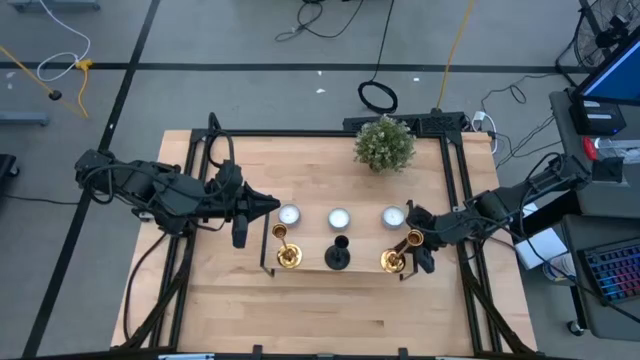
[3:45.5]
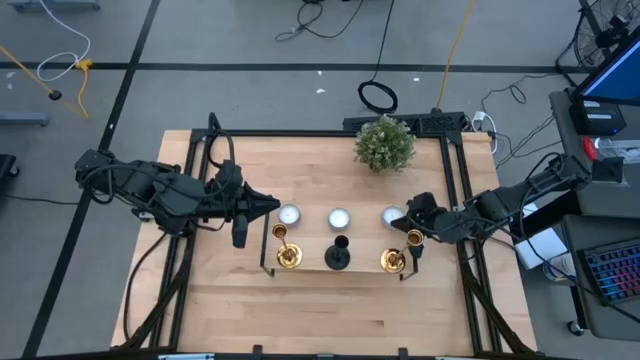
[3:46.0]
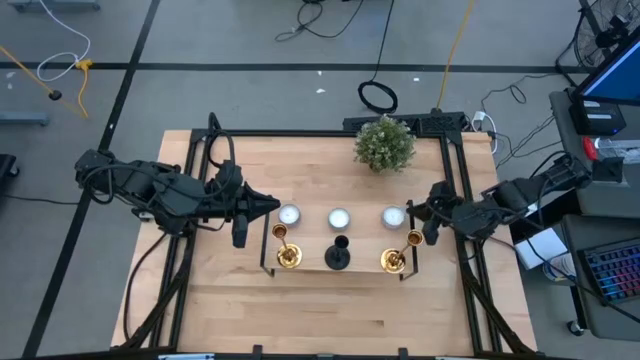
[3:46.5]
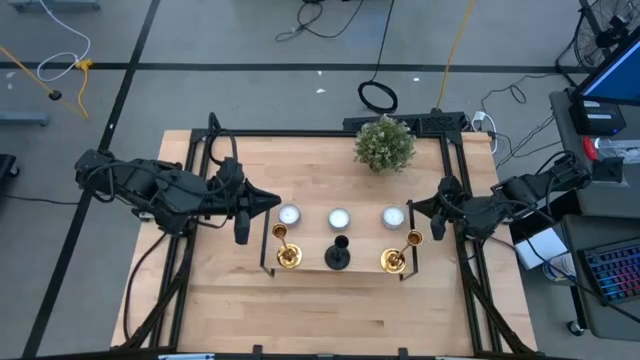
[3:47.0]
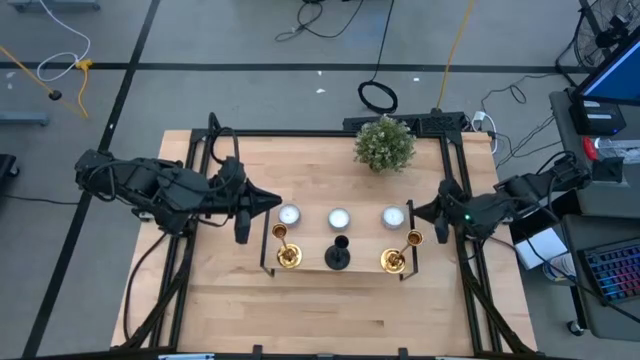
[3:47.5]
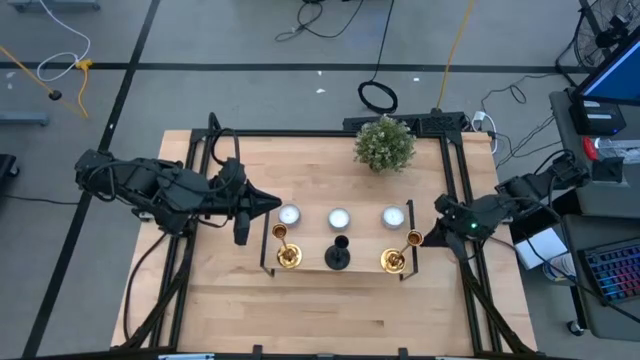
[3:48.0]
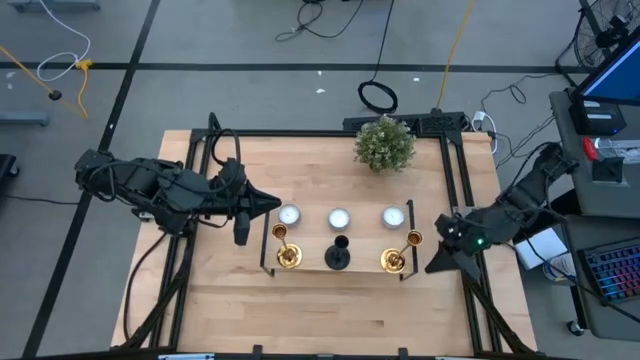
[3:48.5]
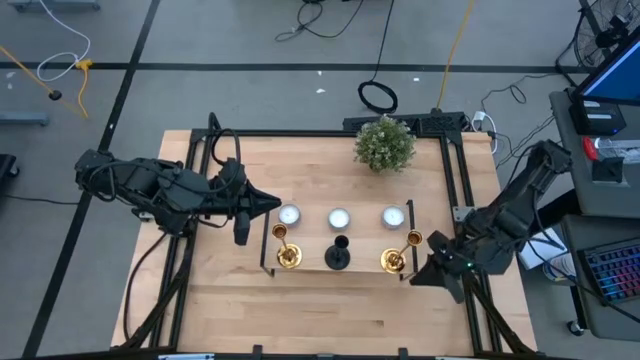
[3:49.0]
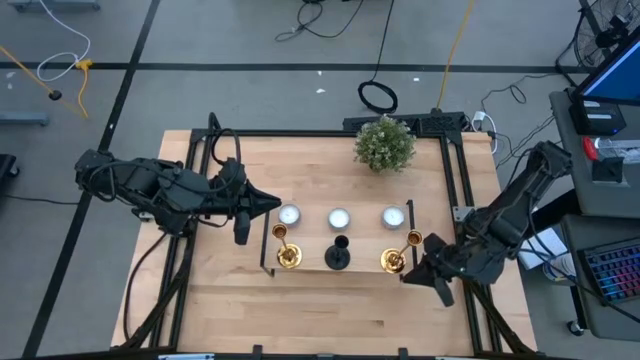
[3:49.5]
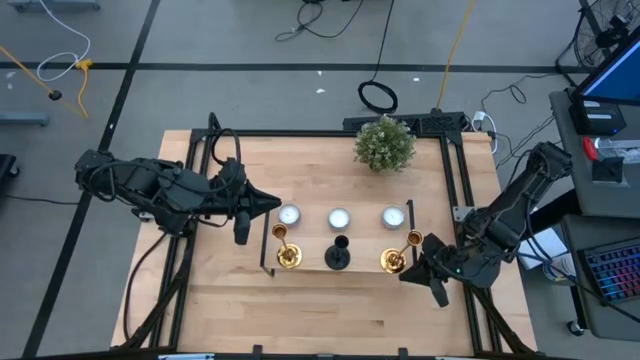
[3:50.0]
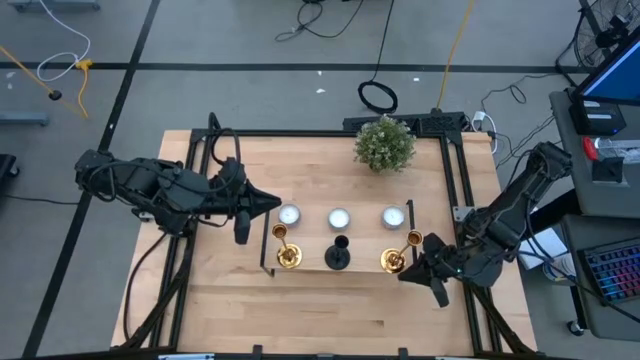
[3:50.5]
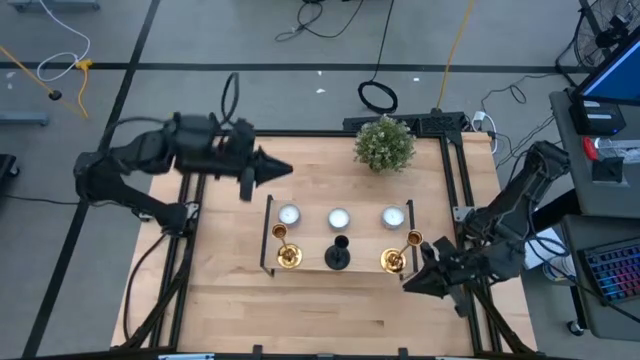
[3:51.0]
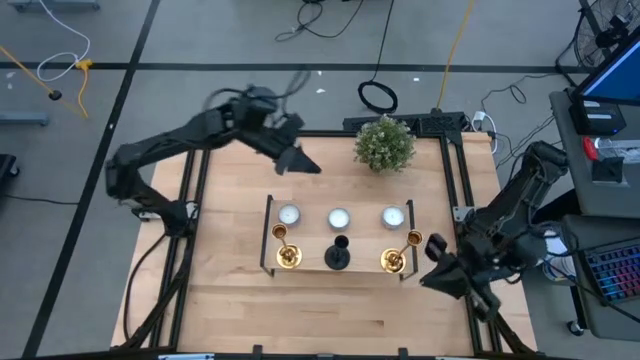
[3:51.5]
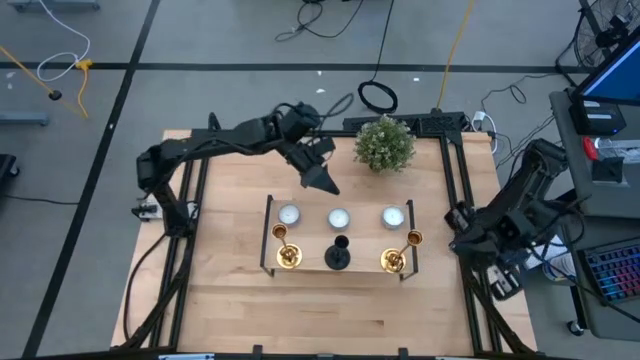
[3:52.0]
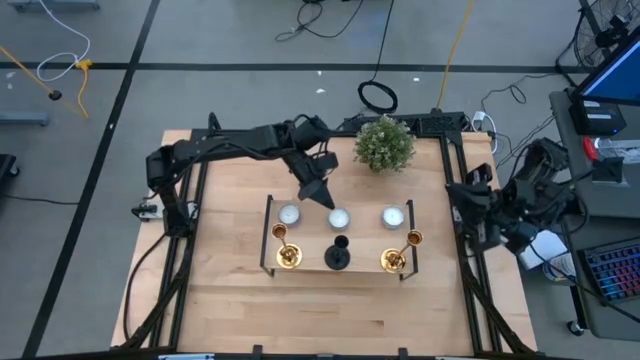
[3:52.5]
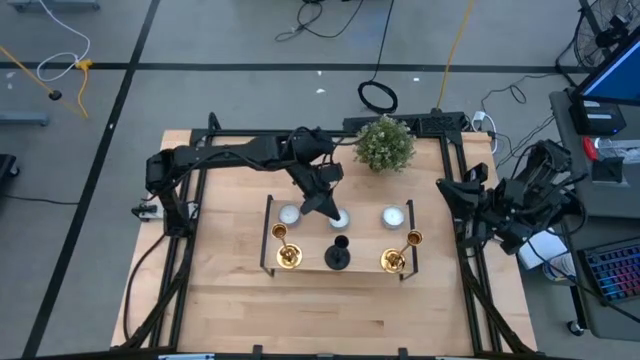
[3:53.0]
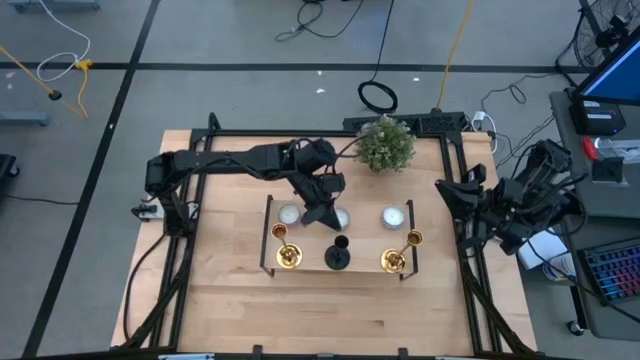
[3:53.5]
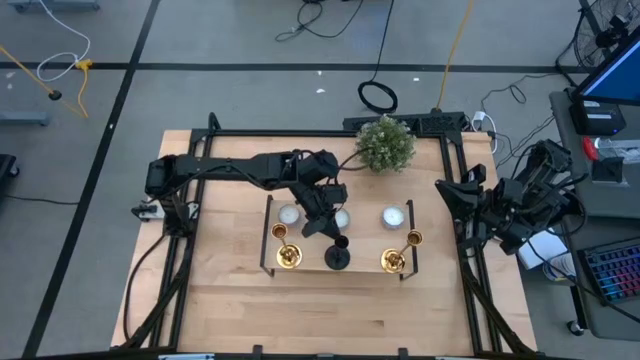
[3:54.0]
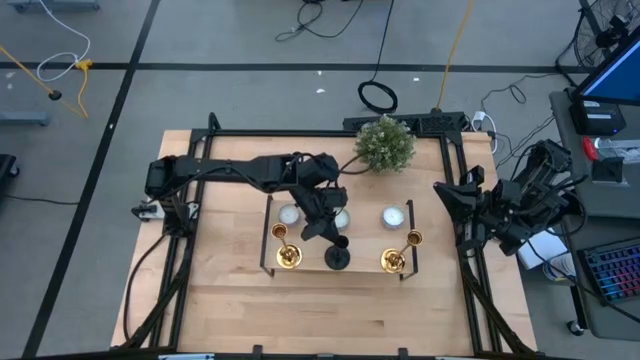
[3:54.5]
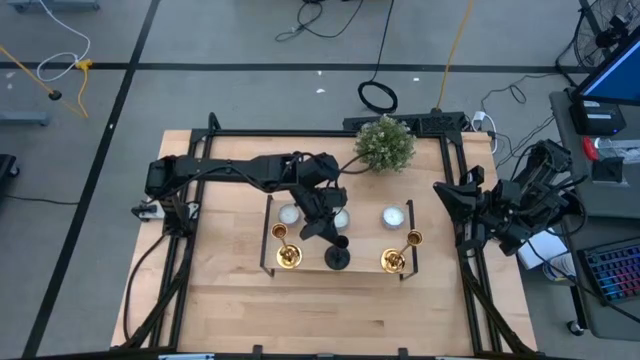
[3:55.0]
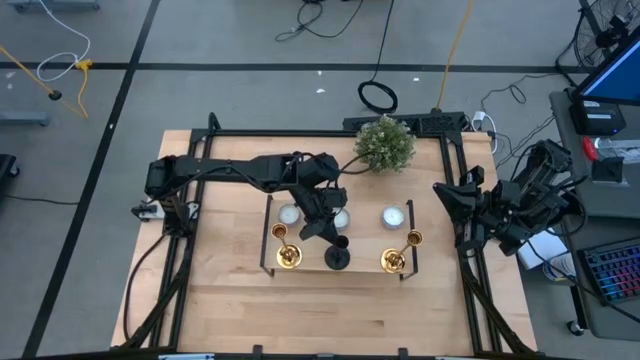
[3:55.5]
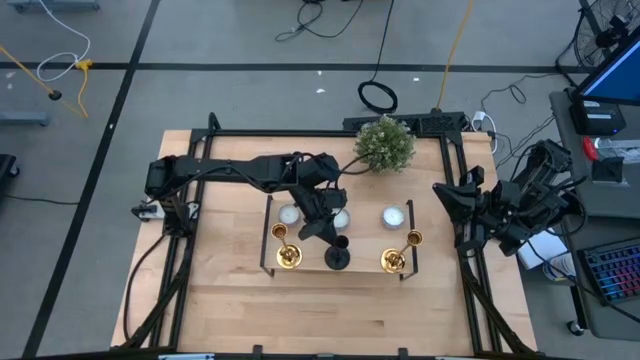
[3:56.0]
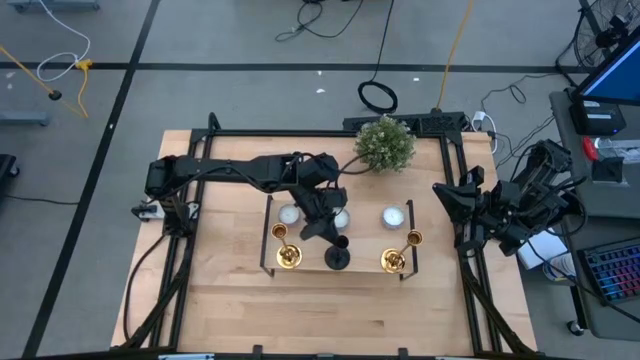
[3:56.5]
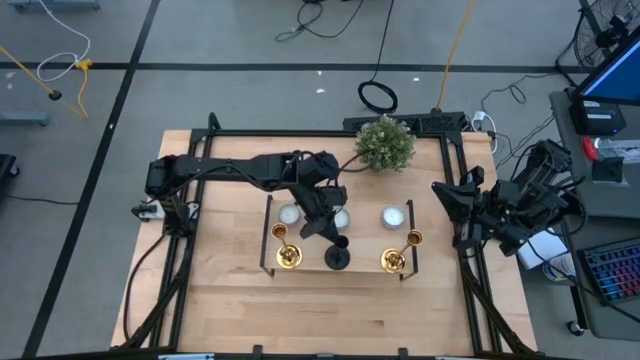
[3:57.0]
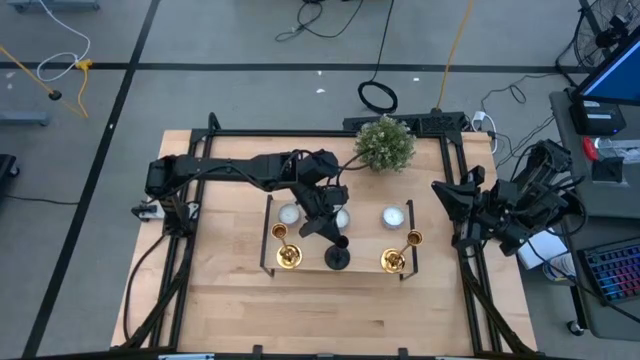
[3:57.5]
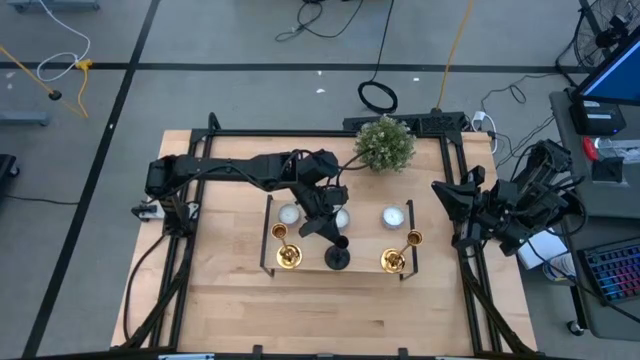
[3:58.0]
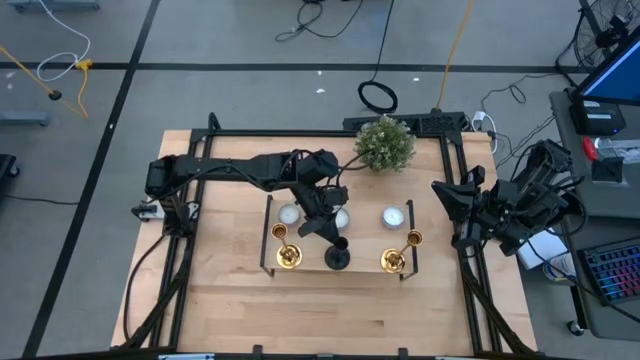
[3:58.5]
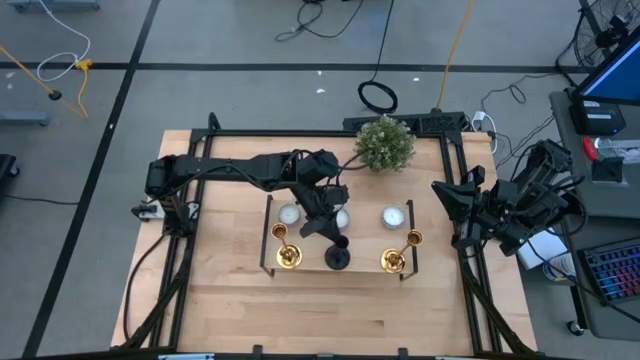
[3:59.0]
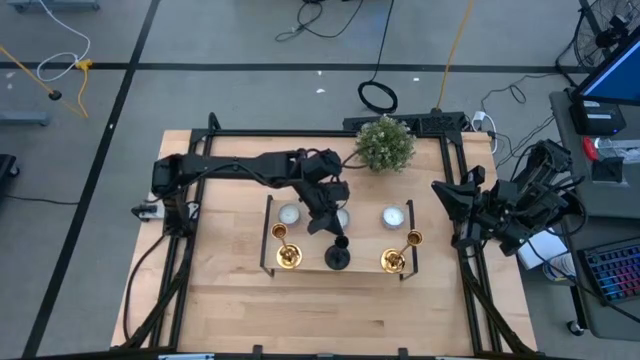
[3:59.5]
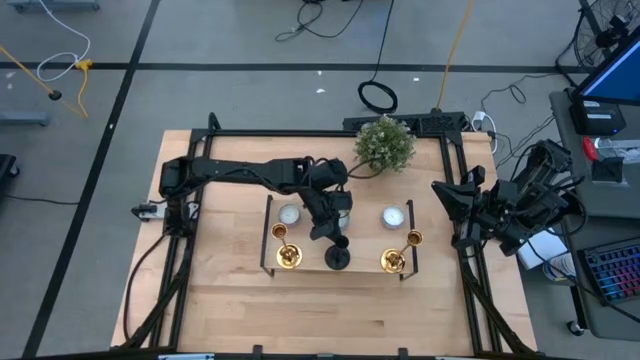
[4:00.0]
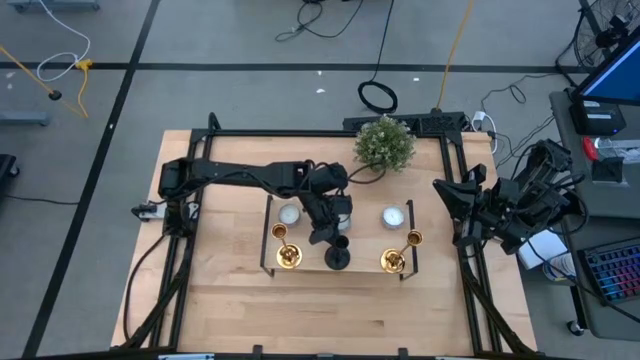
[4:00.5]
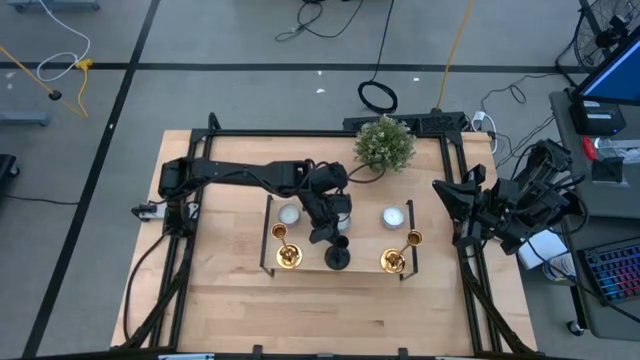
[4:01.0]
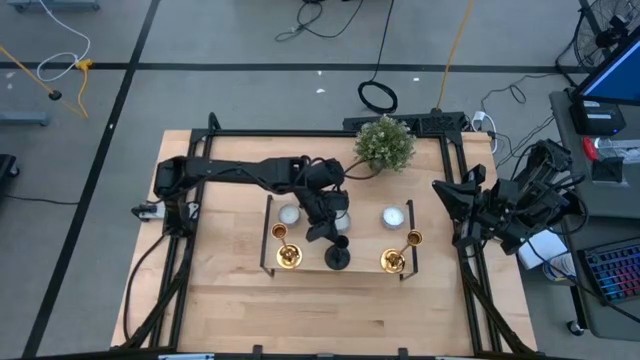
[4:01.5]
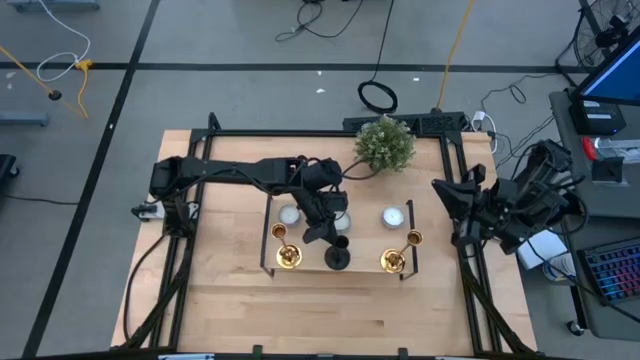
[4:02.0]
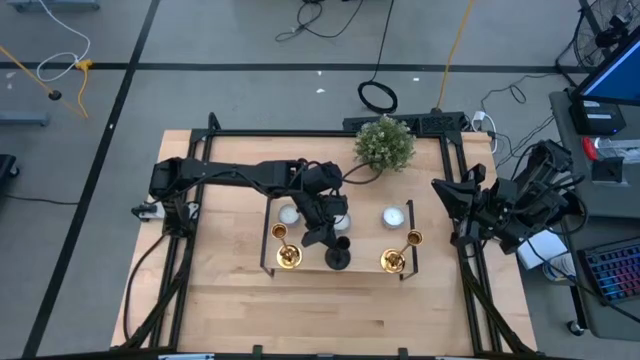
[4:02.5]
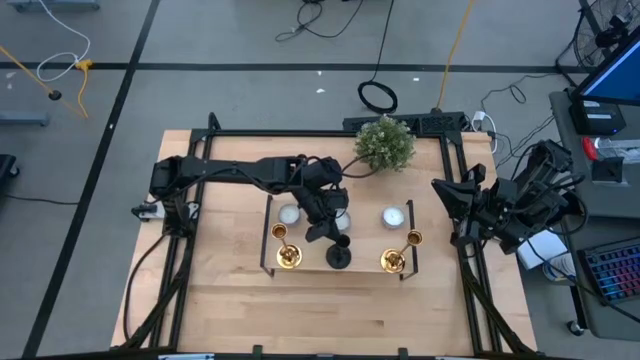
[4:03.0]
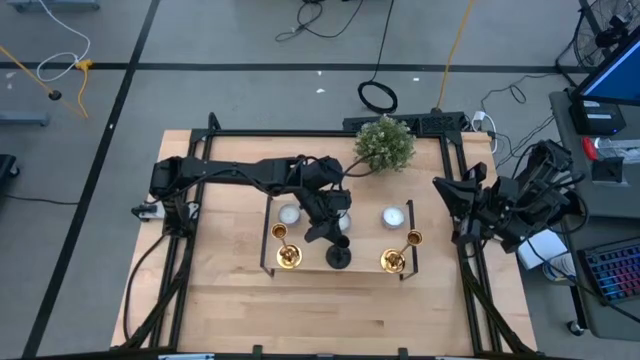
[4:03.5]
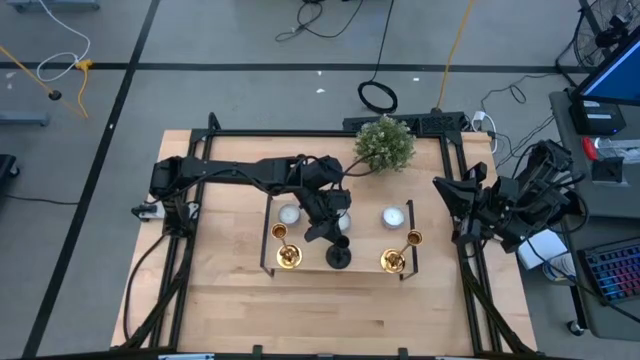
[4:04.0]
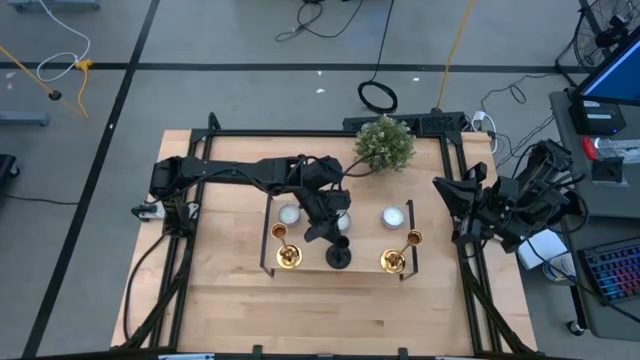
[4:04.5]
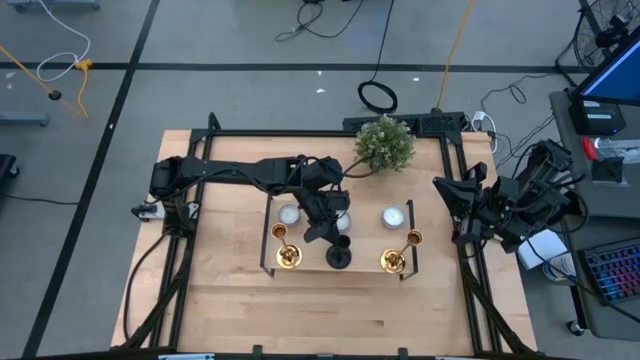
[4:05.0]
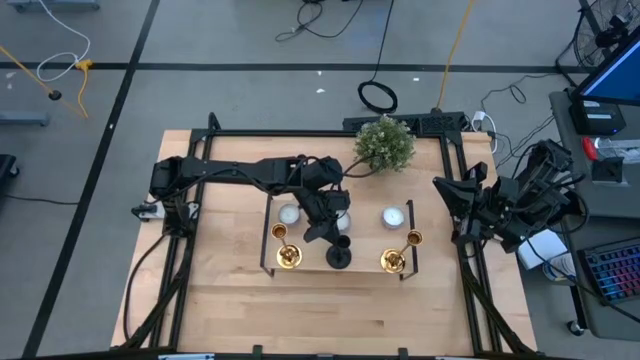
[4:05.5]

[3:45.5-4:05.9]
Task: Pick & Place candle stick holders
Adjust the black candleholder on the shelf

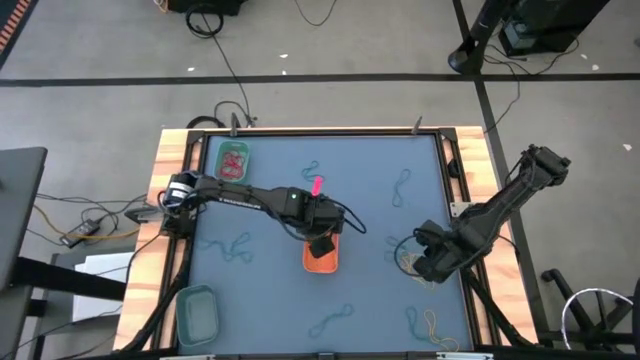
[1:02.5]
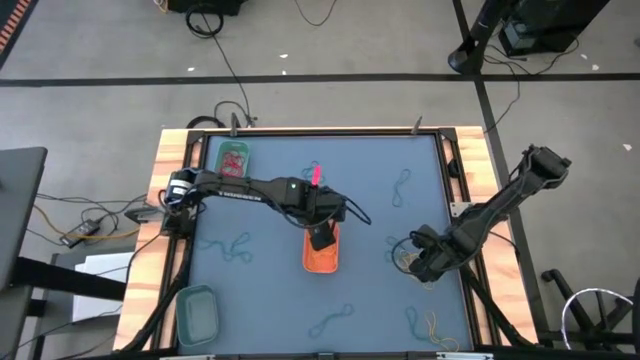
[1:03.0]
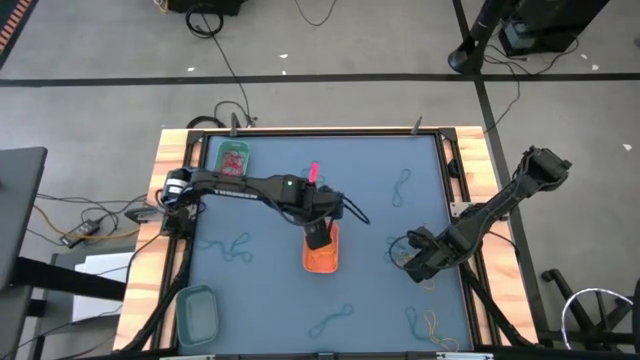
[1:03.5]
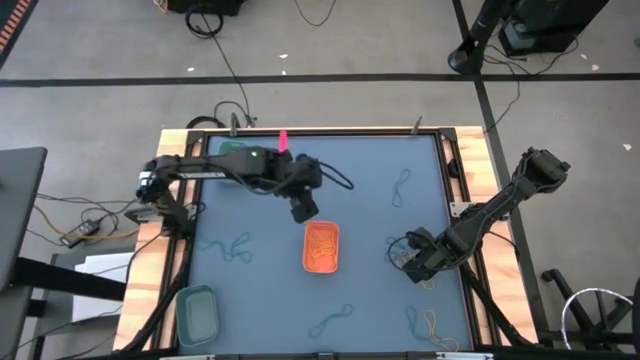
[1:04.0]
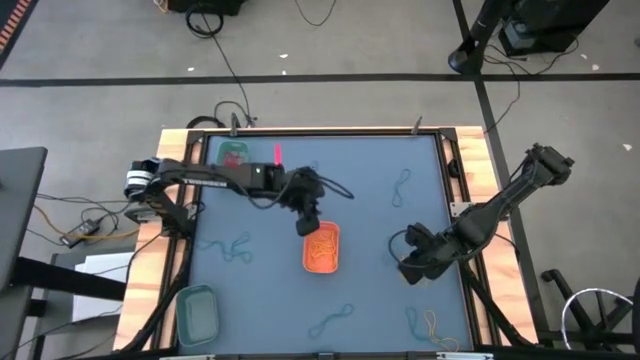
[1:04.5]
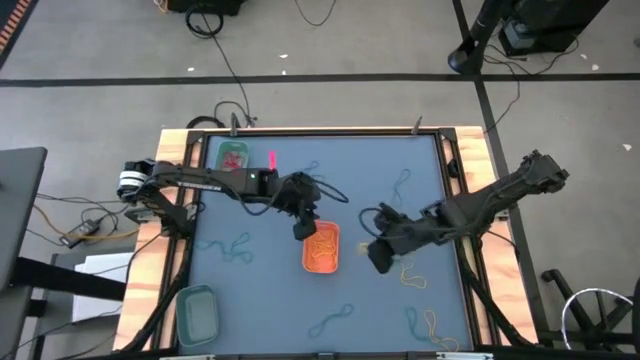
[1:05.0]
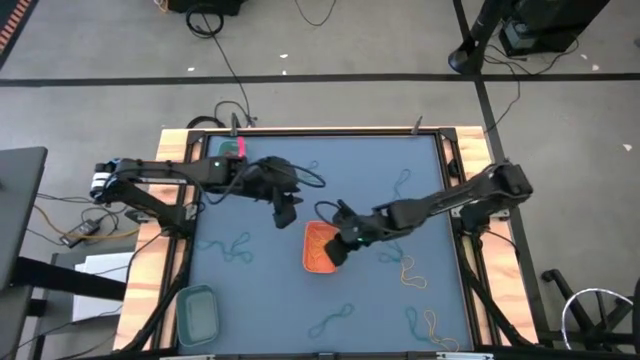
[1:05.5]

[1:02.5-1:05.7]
Task: Sort rubber bands into baskets
Put the yellow rubber band into the orange bin
